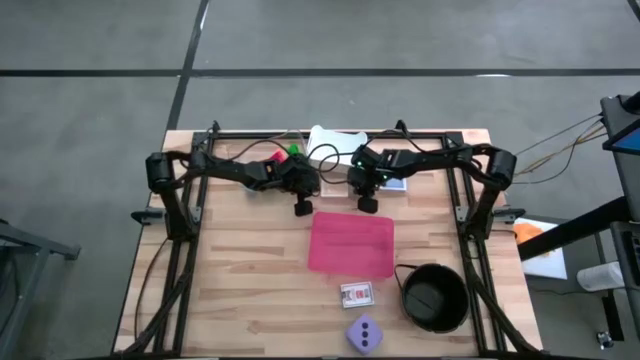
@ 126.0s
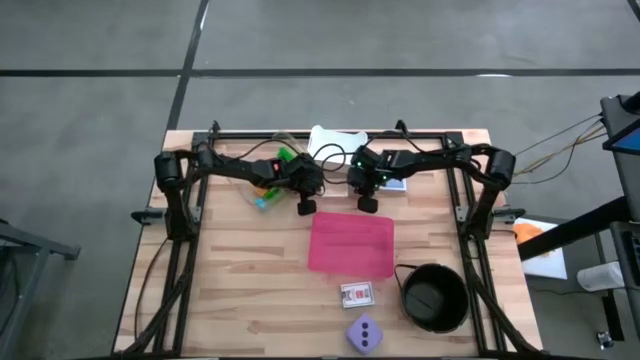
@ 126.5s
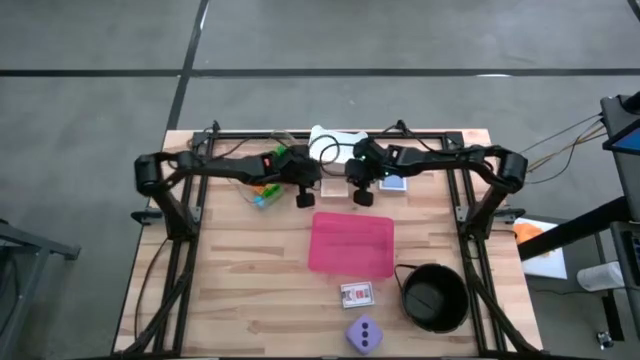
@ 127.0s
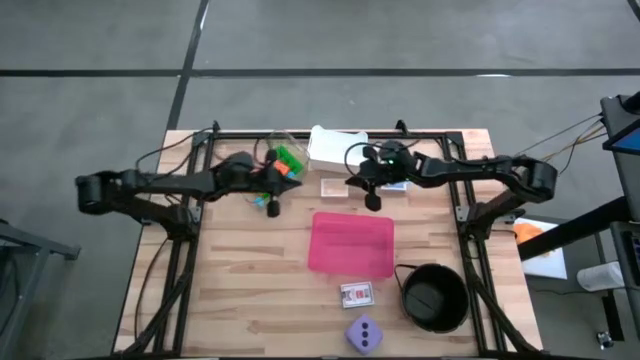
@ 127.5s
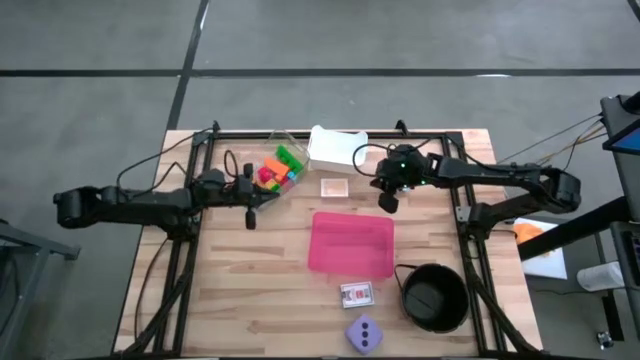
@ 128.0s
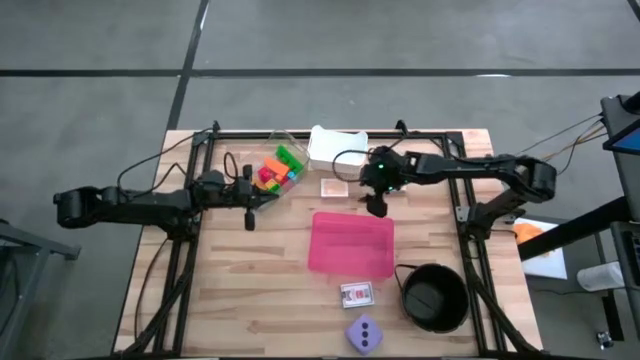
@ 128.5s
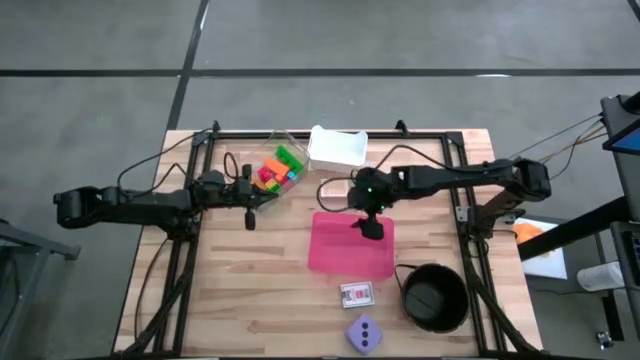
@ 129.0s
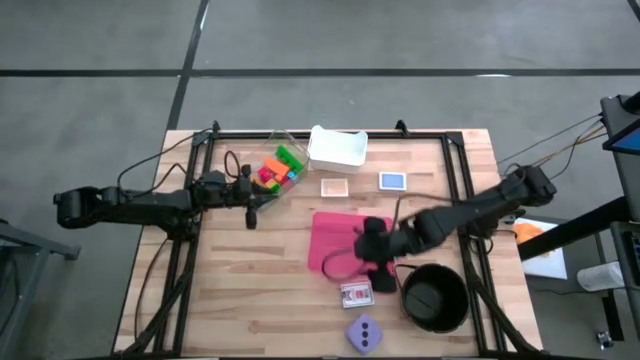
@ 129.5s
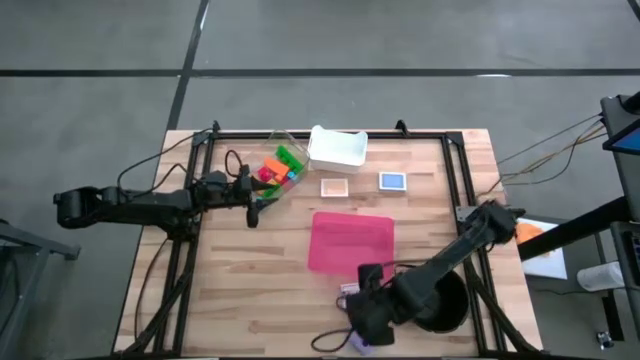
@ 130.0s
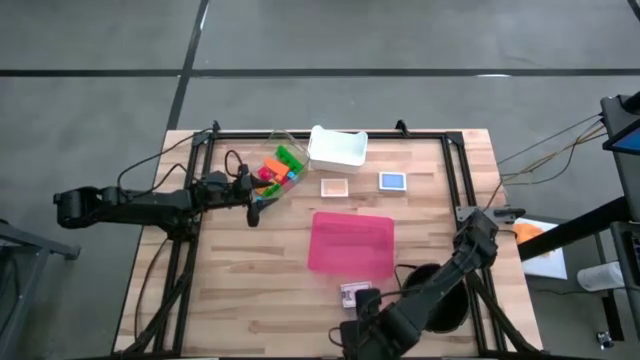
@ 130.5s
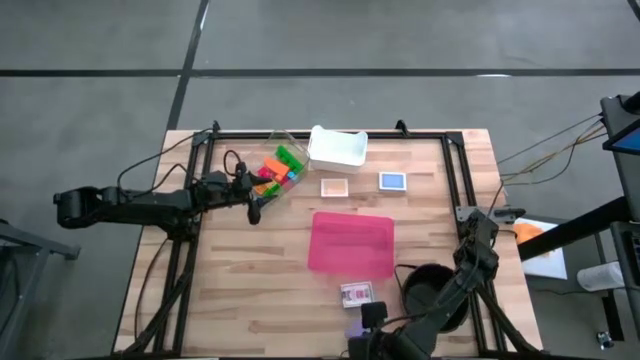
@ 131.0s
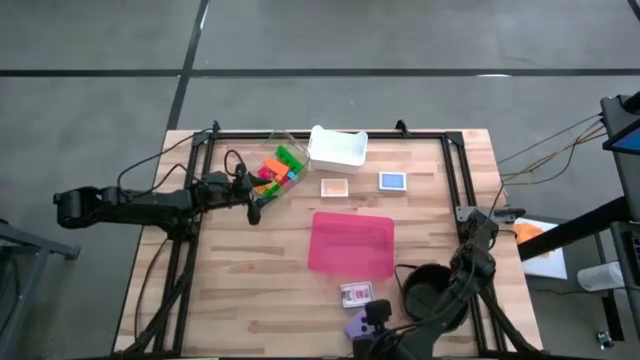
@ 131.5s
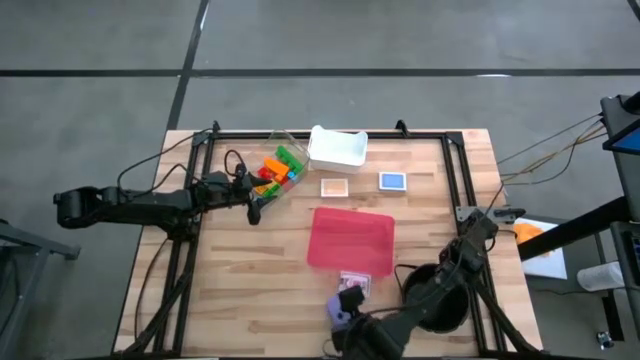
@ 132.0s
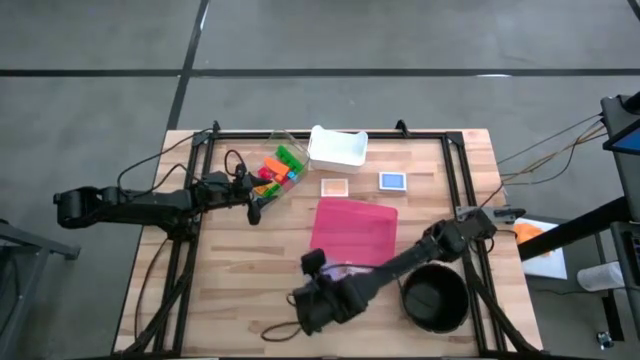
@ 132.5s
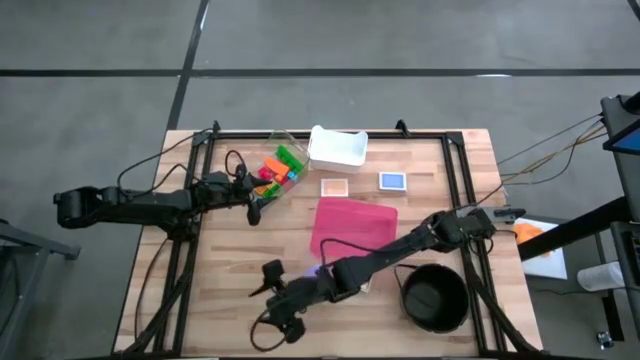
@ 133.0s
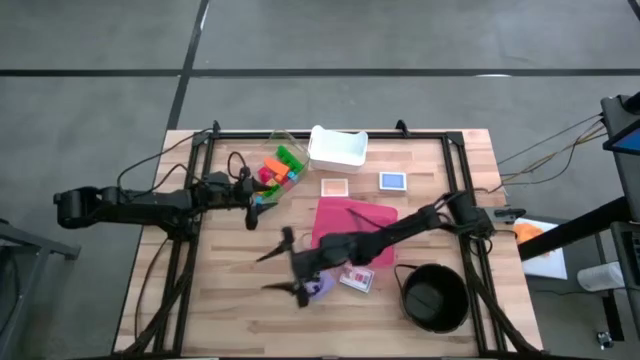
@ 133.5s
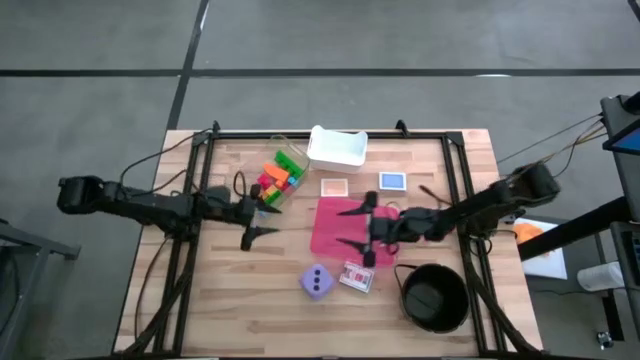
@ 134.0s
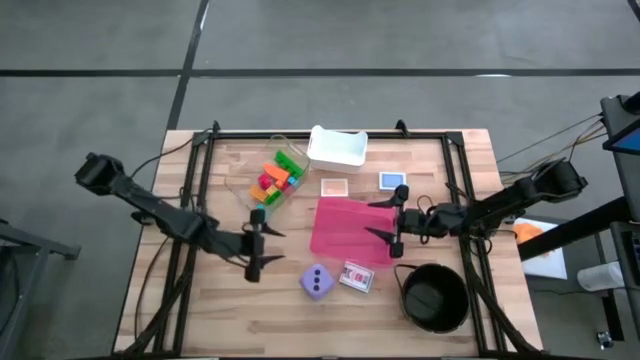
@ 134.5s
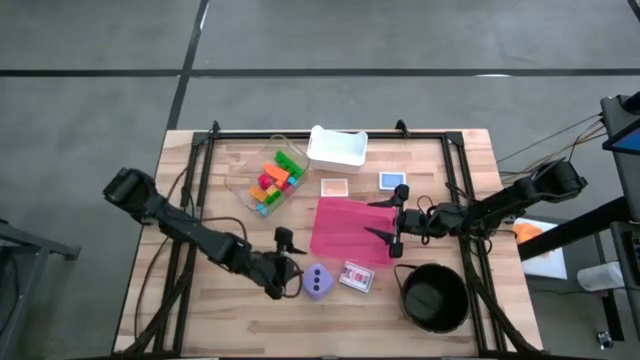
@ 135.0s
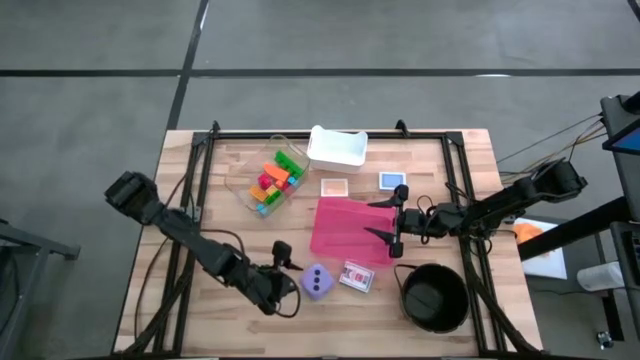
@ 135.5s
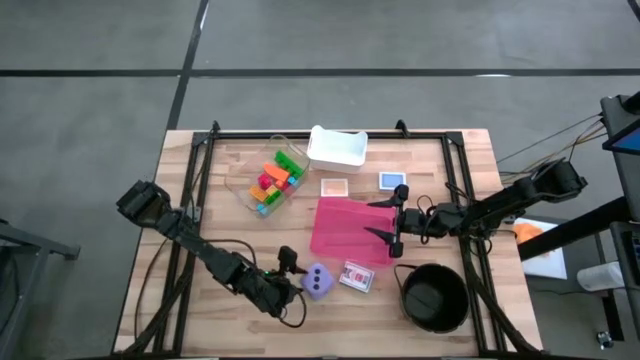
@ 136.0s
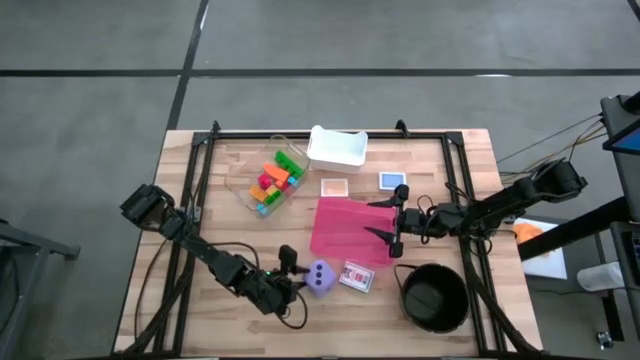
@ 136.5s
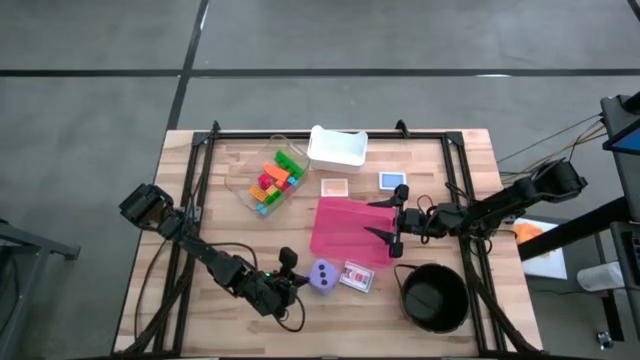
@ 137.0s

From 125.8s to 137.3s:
Task: Pick & Place Toys
Put the purple die into the pink bin

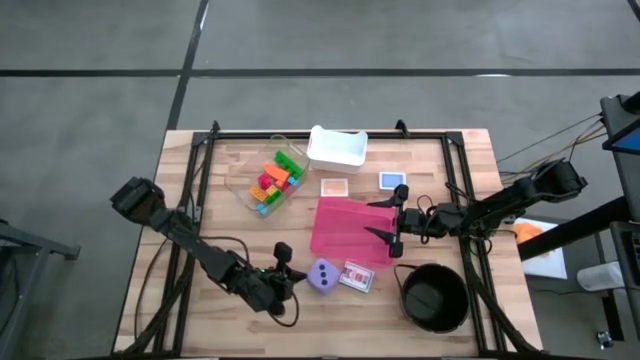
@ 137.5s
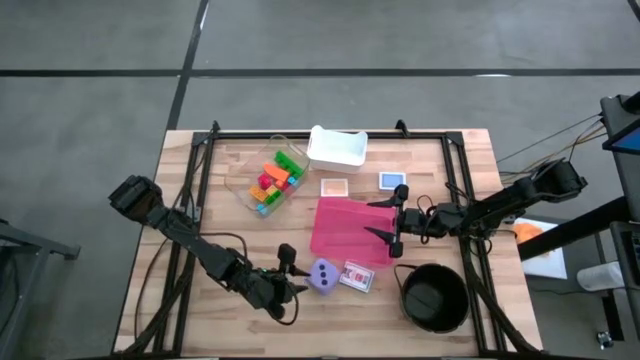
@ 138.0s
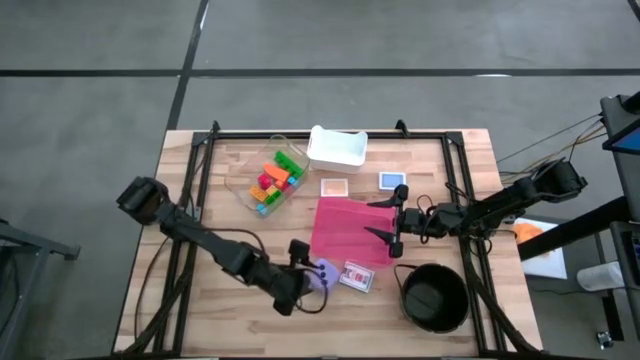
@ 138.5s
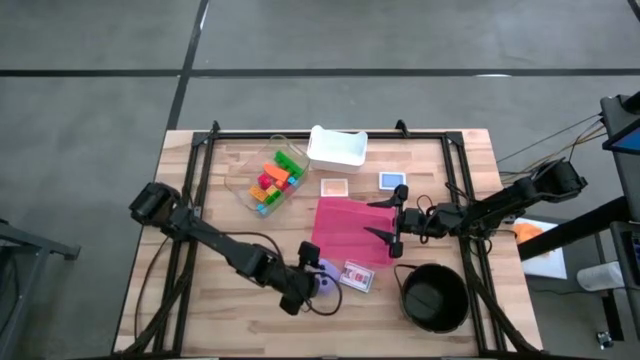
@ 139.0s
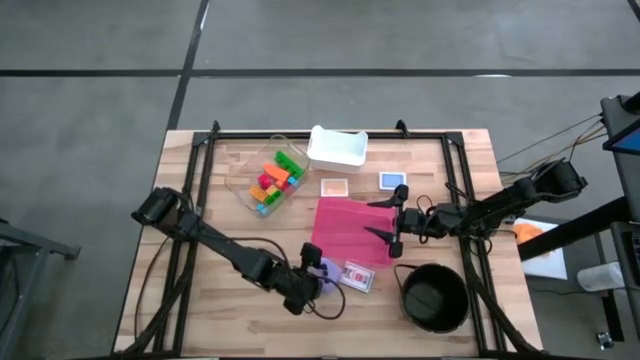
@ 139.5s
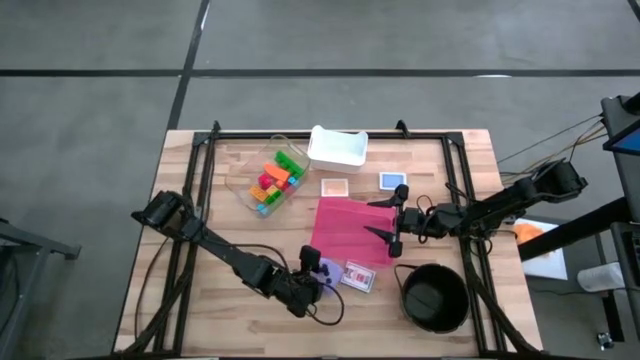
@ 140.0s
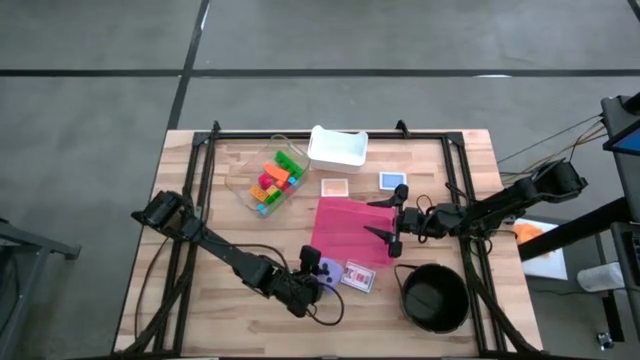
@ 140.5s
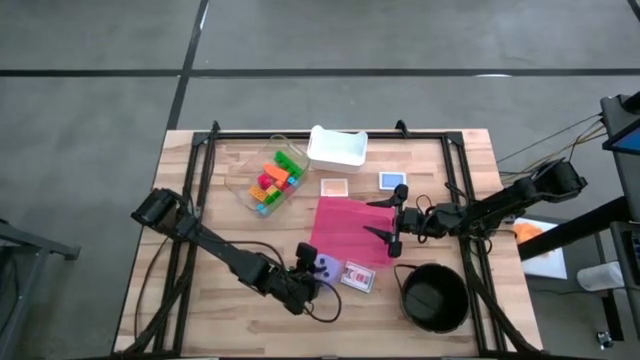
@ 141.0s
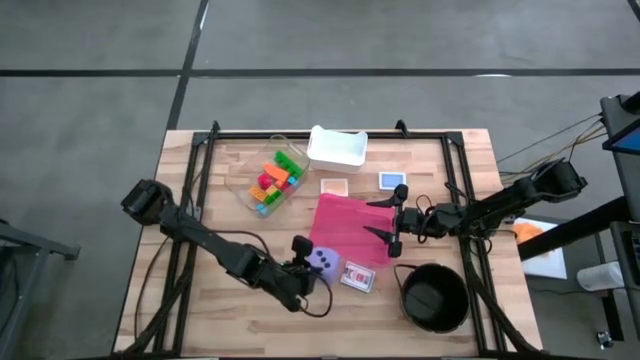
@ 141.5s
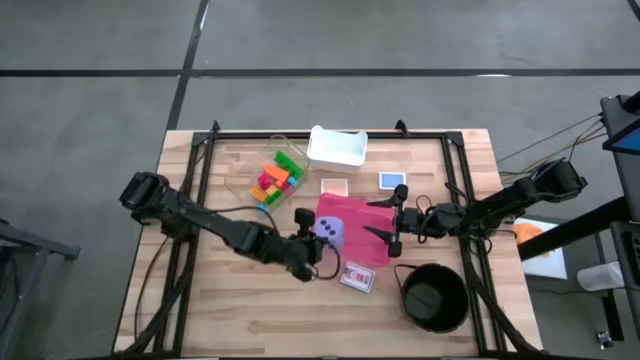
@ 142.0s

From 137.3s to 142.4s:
Put the purple dice into the pink bin

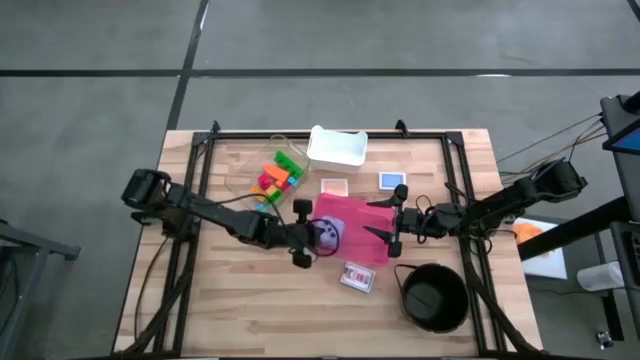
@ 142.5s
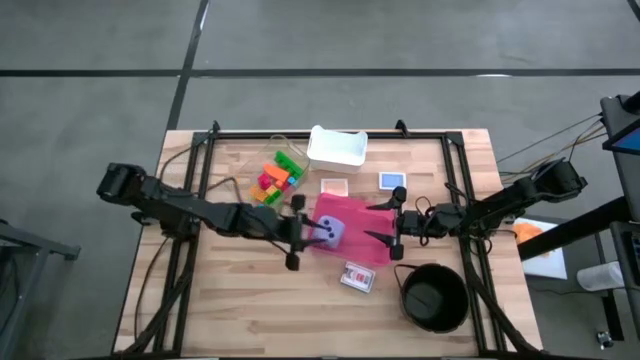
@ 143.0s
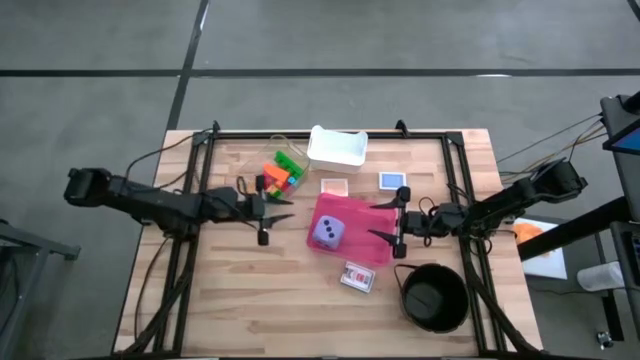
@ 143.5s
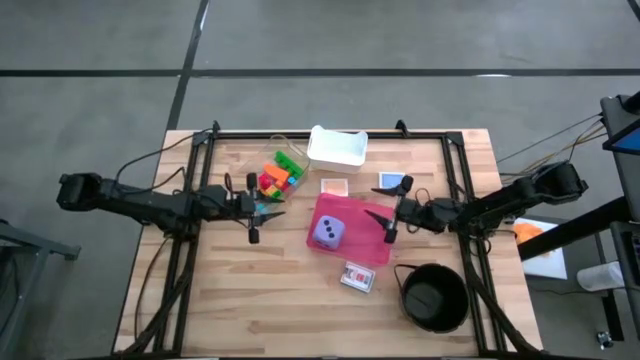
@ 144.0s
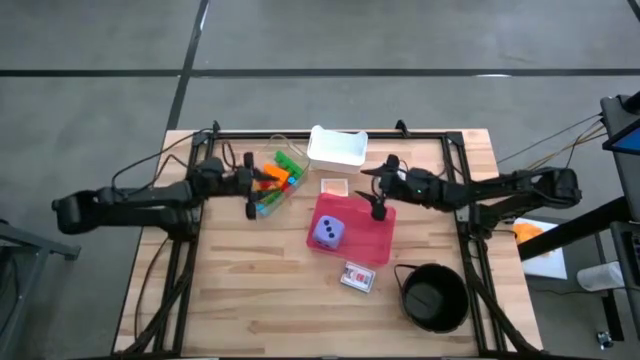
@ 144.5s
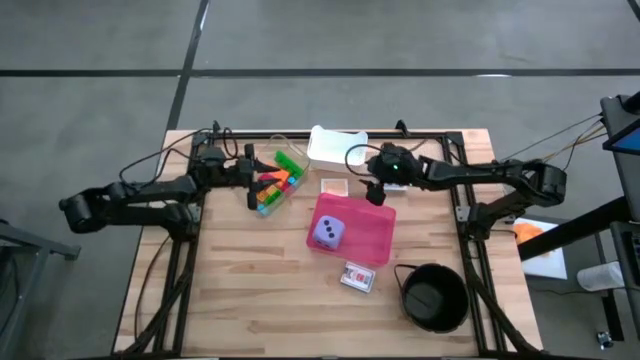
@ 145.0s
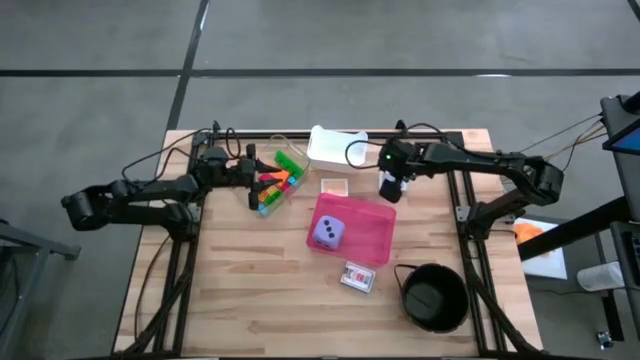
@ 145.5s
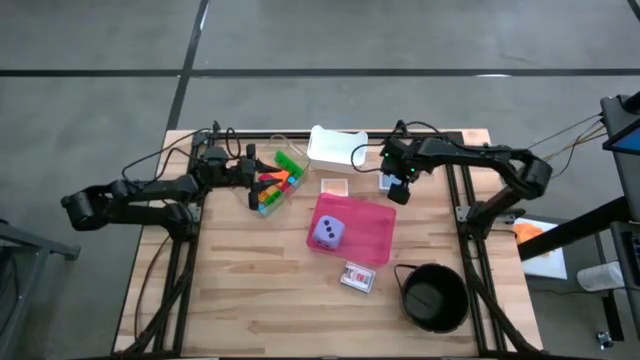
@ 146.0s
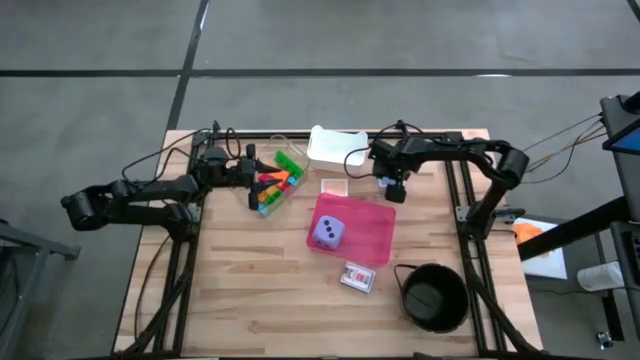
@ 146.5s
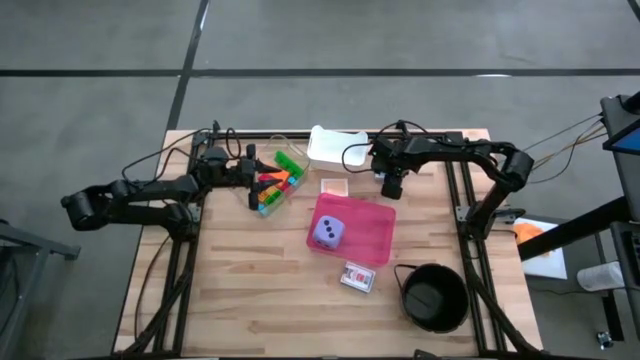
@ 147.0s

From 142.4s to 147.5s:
Put the blue playing card into the white bin
